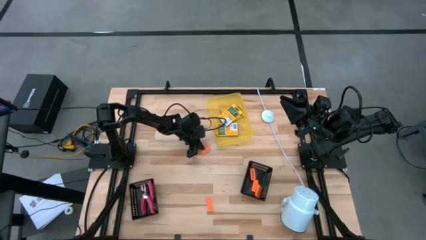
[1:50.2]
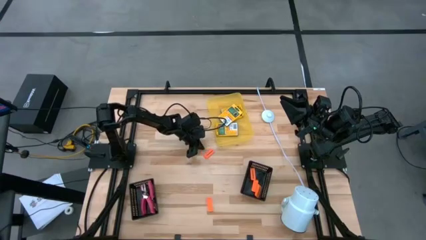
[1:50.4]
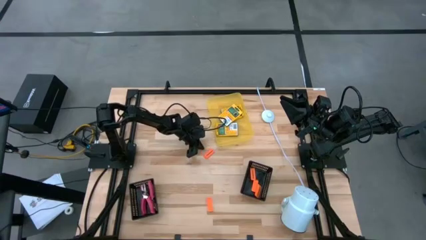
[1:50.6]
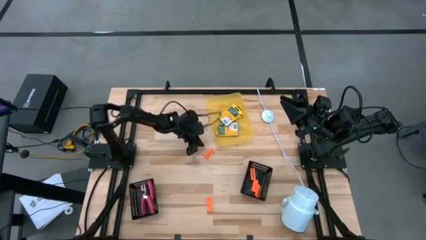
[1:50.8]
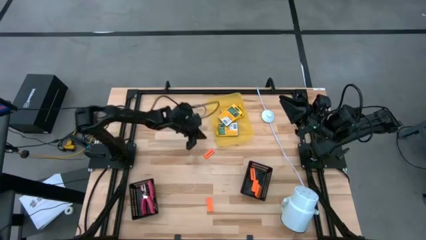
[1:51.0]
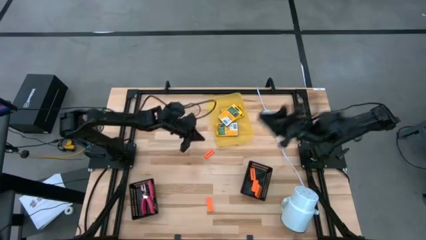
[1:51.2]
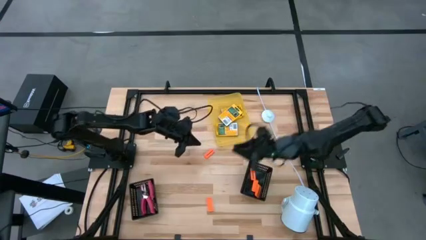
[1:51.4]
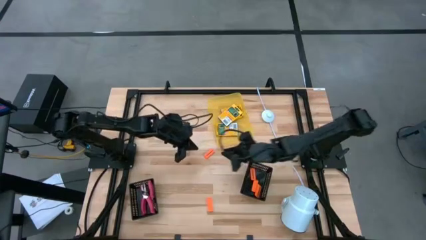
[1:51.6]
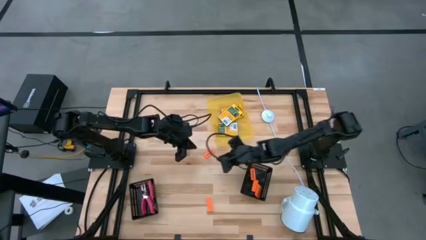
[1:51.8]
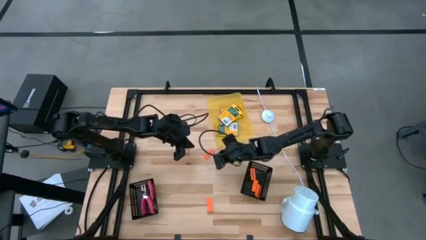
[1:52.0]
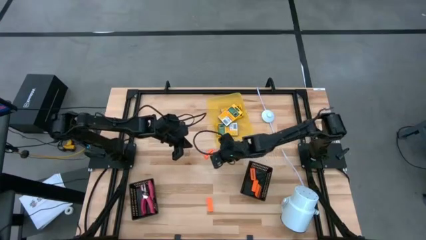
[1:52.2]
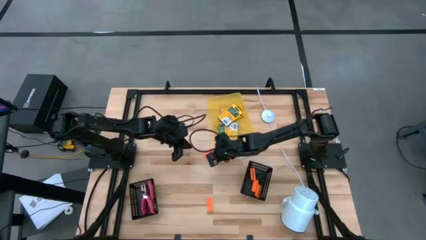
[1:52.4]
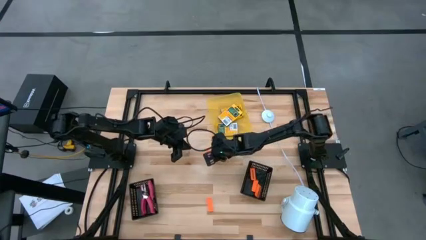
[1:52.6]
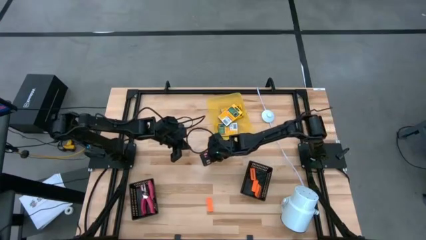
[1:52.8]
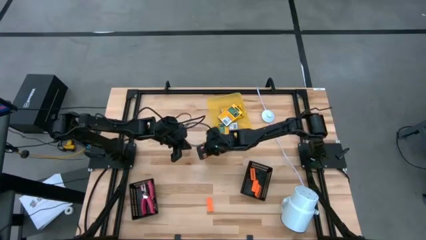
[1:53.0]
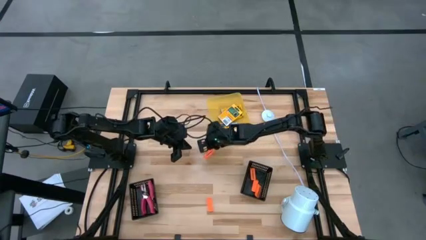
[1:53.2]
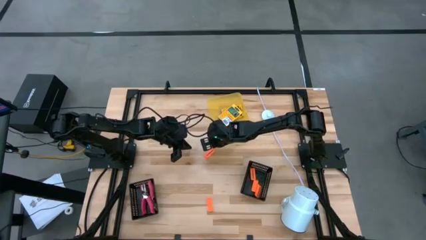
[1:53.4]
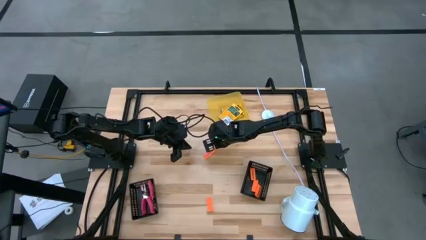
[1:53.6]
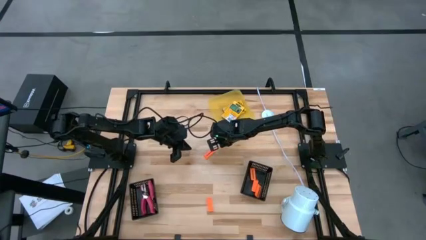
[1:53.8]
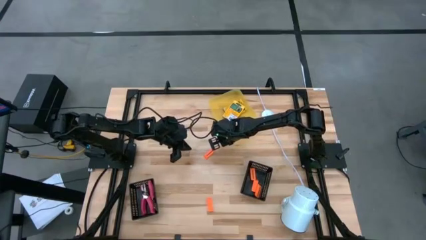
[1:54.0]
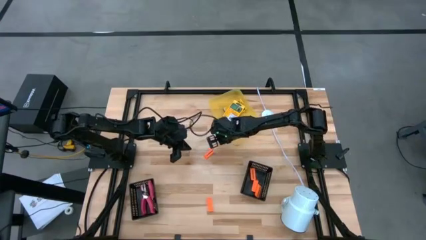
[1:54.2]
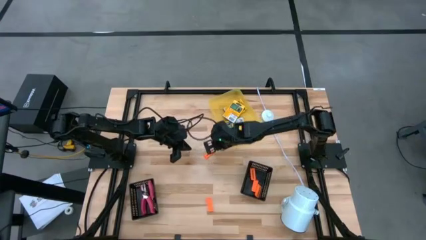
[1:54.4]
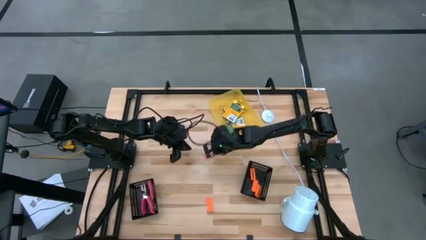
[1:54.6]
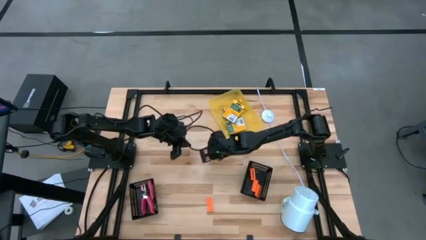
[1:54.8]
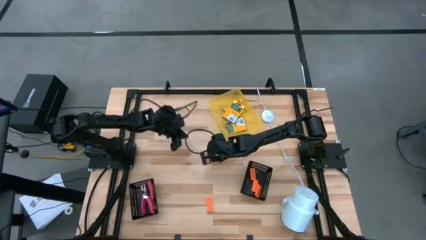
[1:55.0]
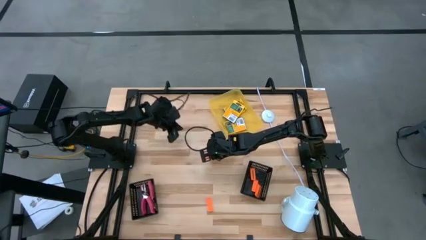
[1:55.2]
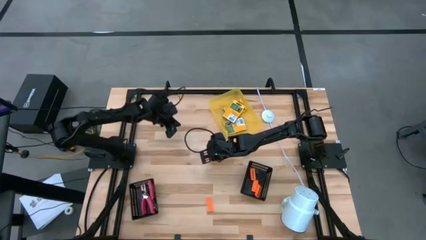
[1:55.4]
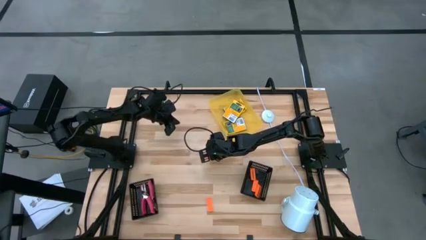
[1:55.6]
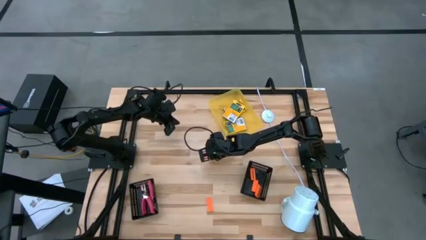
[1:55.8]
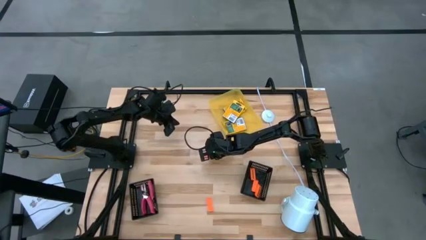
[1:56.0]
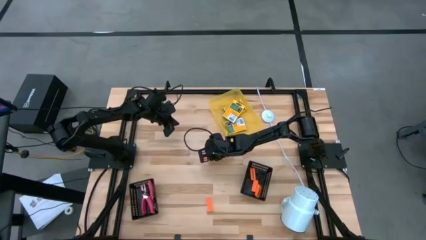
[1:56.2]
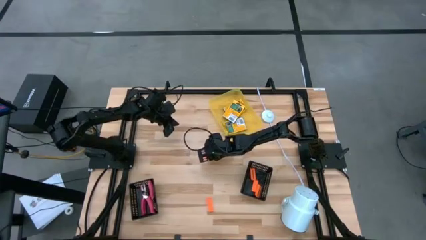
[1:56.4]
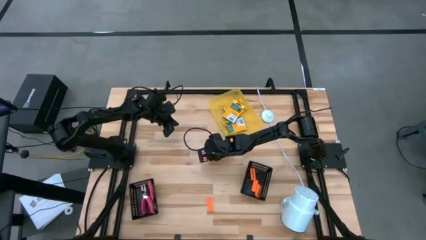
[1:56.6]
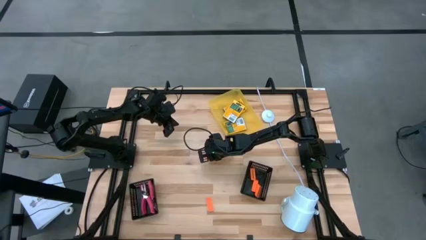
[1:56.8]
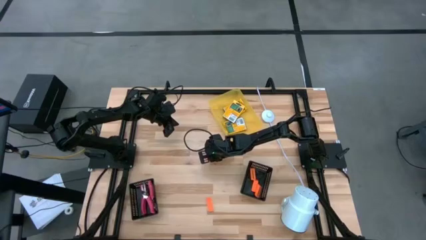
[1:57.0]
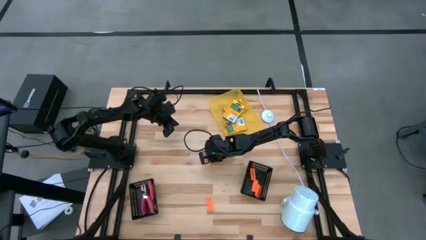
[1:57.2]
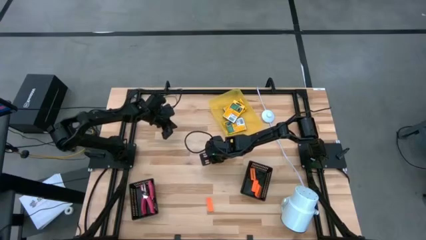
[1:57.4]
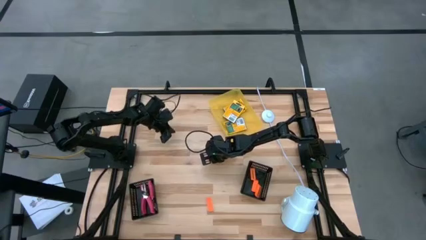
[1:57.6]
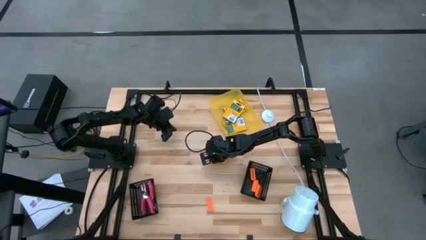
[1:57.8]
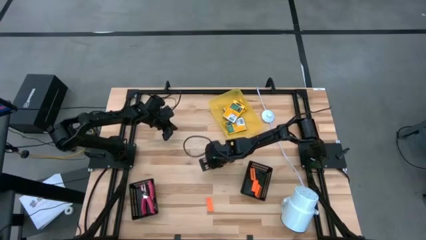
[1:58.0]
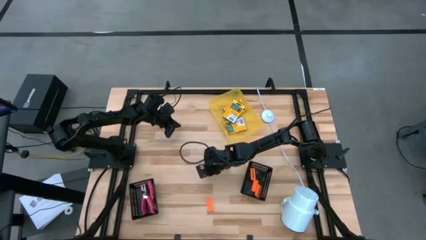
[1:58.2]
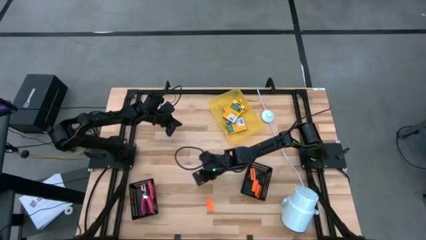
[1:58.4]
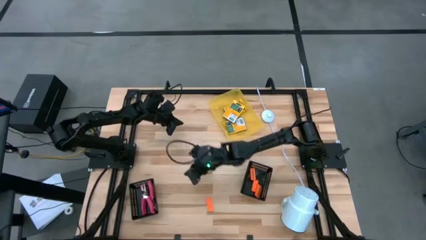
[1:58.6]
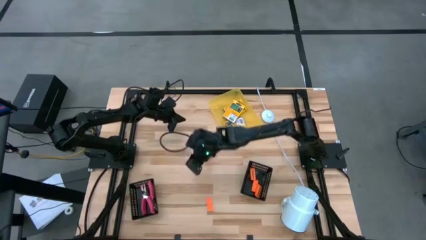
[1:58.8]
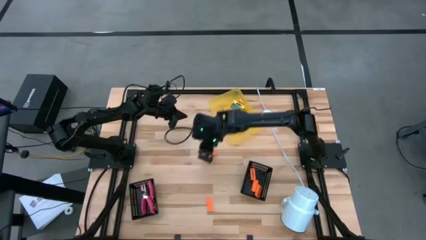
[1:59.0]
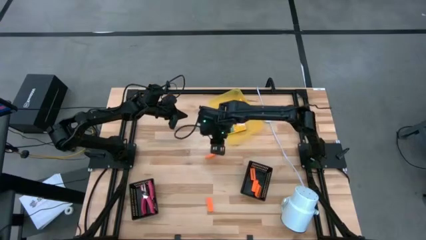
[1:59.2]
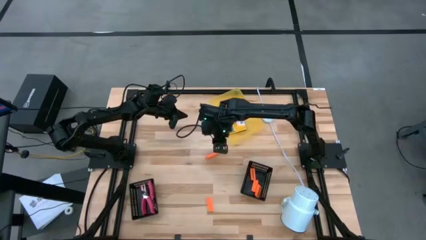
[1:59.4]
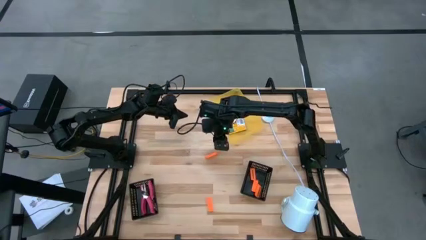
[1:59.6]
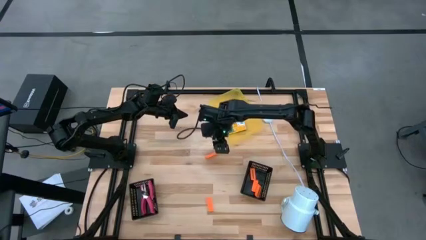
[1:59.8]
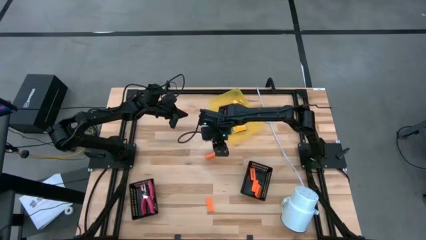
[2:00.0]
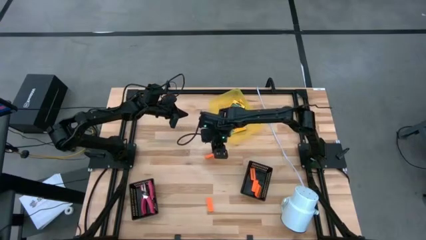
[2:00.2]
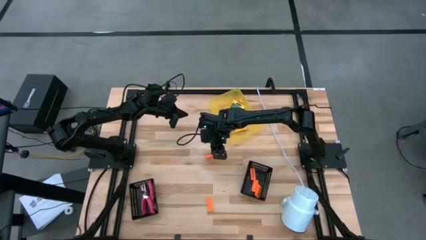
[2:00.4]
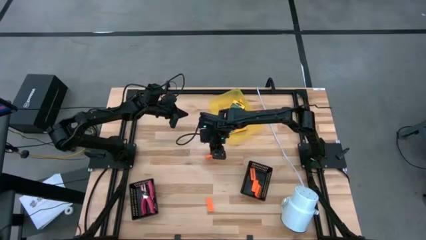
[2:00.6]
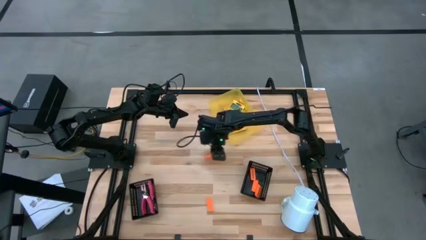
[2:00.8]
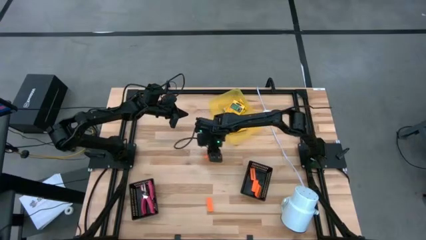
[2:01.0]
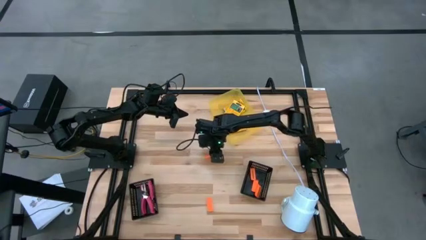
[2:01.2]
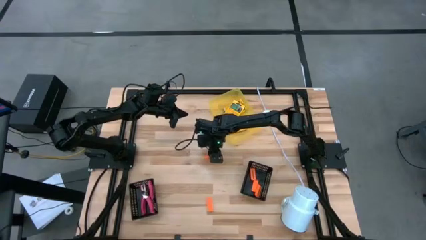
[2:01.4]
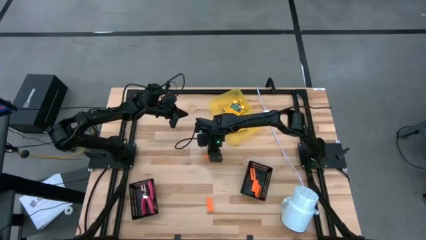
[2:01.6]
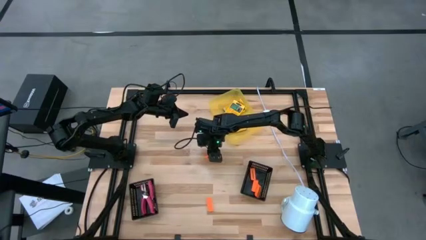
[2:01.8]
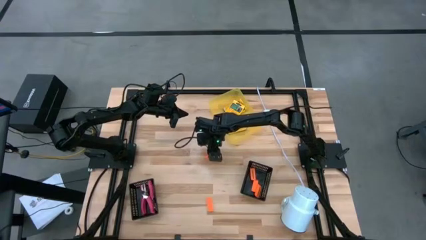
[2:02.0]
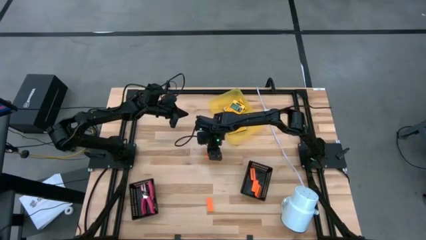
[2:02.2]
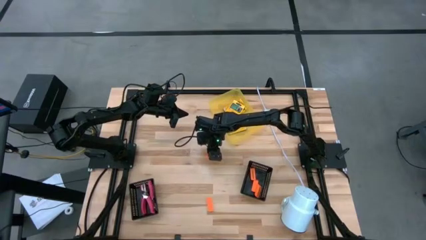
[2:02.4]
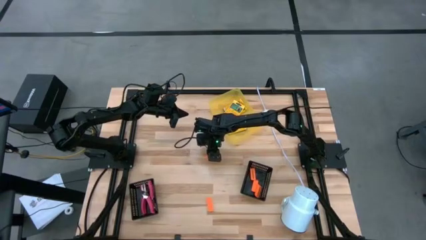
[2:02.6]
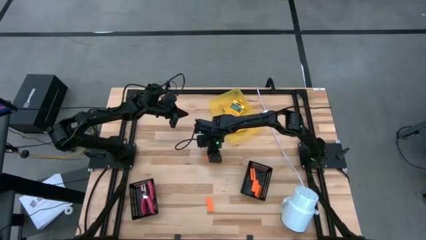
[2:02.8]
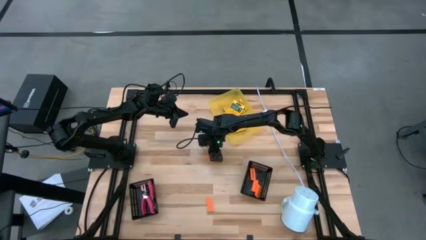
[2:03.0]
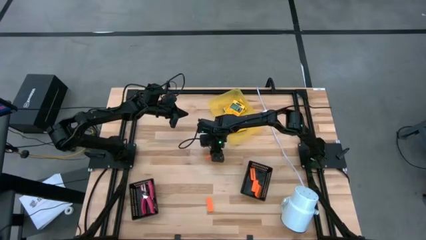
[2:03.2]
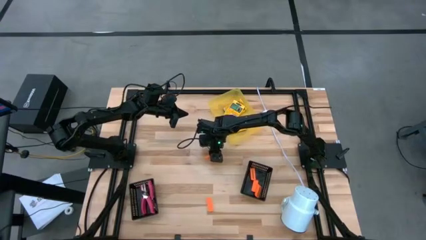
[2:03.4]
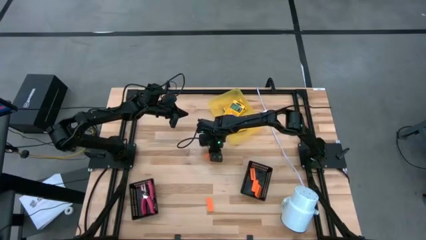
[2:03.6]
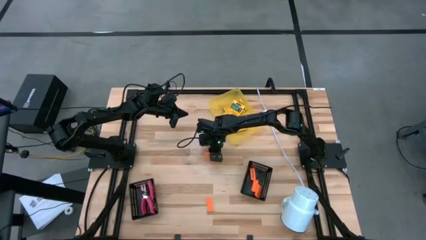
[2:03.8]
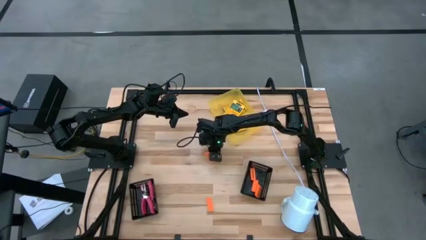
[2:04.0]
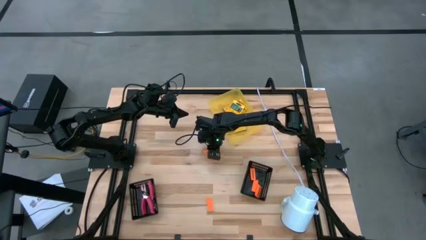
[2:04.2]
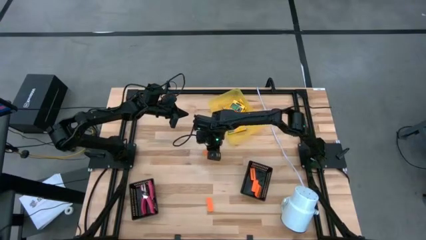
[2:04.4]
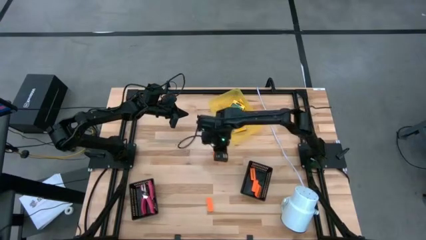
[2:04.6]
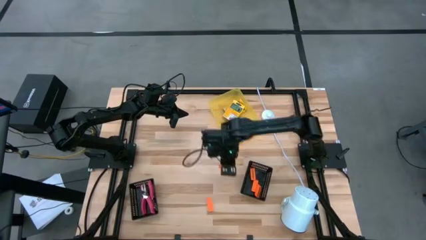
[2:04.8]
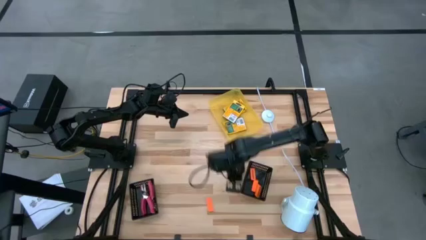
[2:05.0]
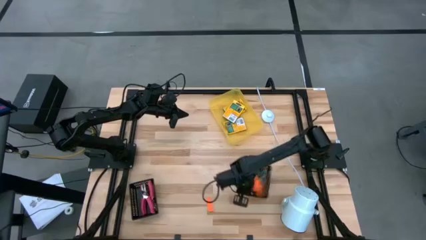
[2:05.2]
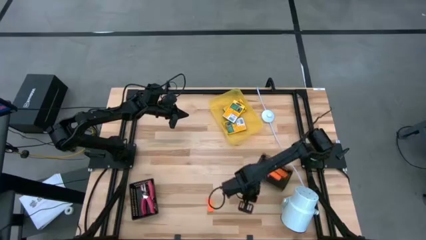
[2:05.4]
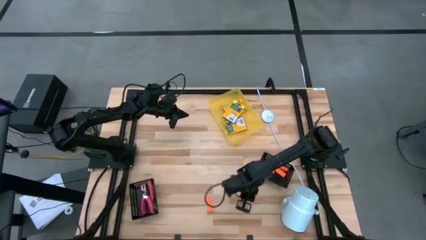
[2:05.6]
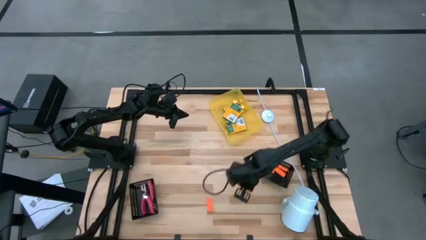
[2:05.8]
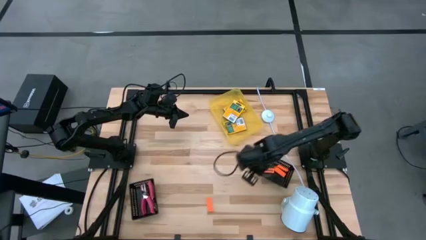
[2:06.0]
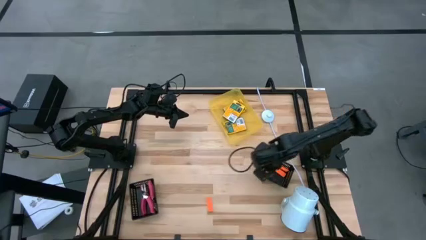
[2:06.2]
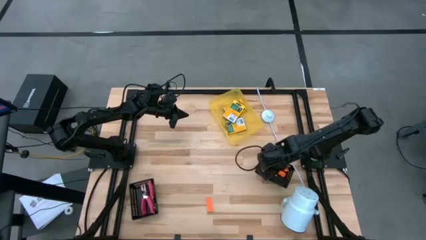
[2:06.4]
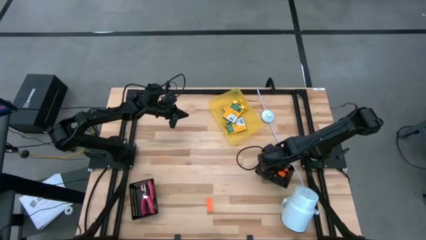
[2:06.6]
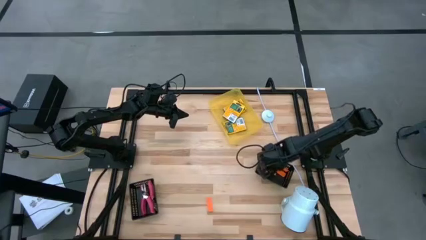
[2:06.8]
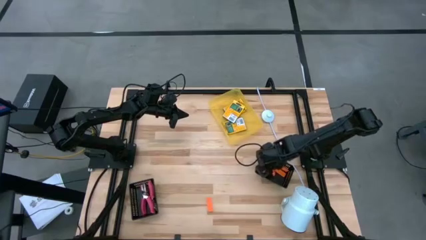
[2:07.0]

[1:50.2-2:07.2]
Task: Pick & Place School Supplies
Put the orange eraser into the right black bin
